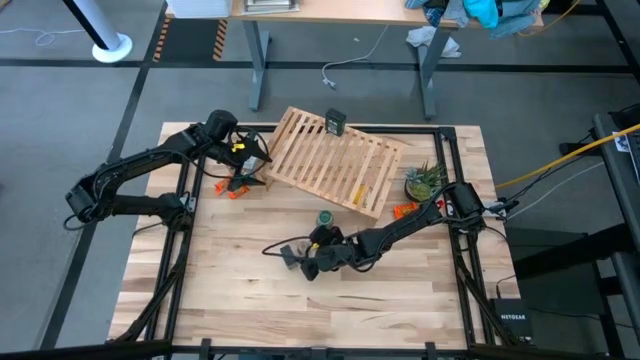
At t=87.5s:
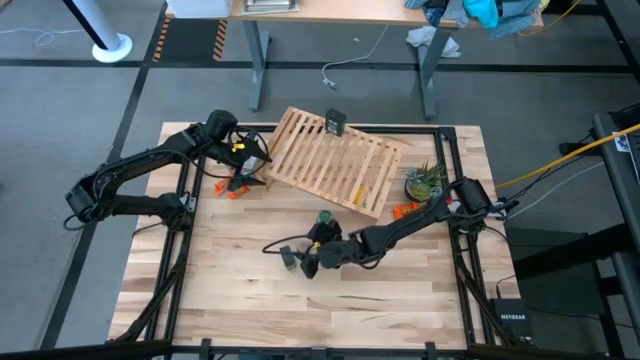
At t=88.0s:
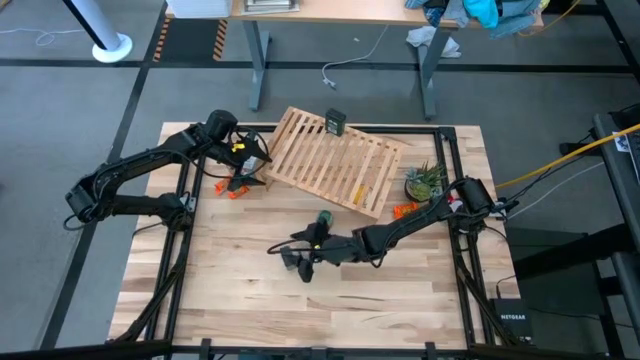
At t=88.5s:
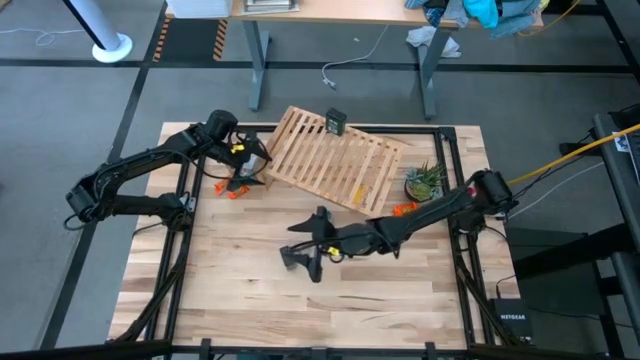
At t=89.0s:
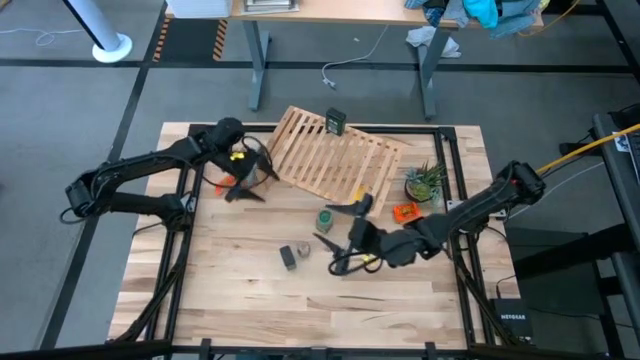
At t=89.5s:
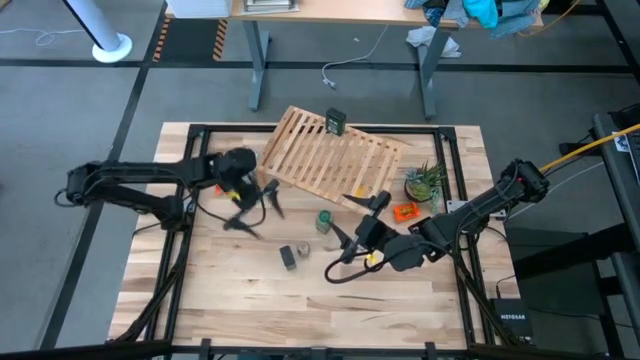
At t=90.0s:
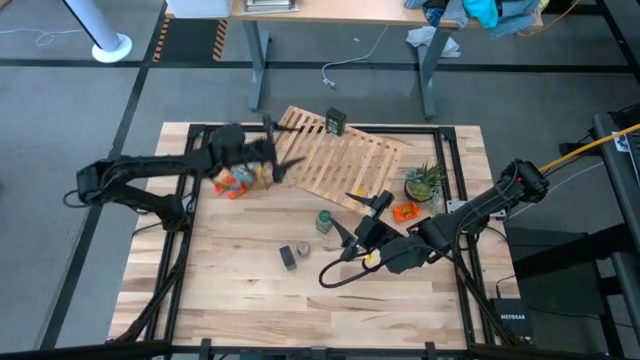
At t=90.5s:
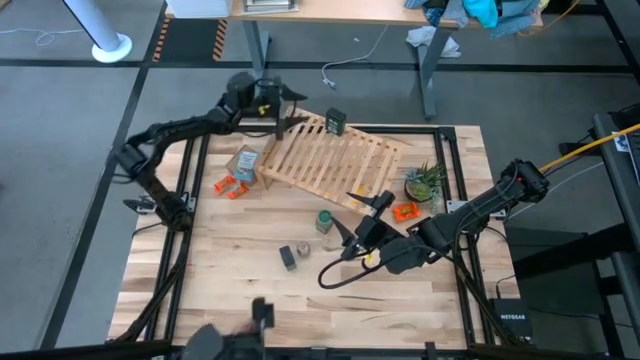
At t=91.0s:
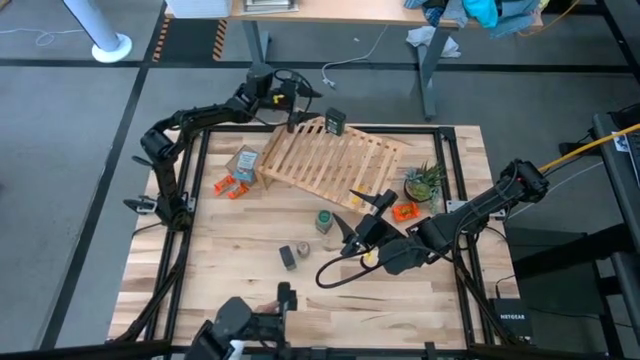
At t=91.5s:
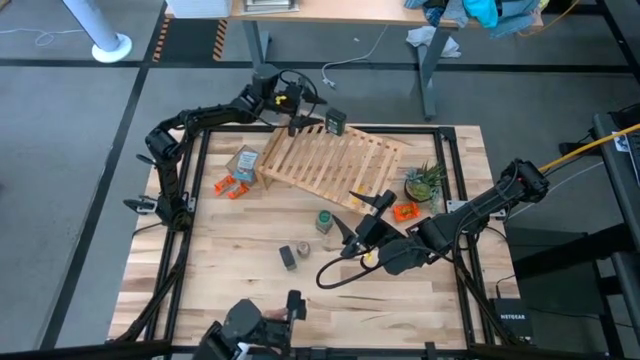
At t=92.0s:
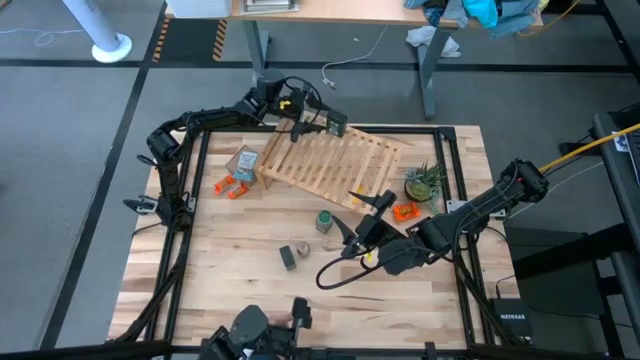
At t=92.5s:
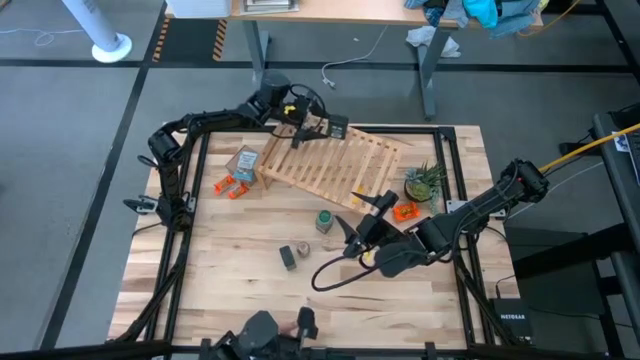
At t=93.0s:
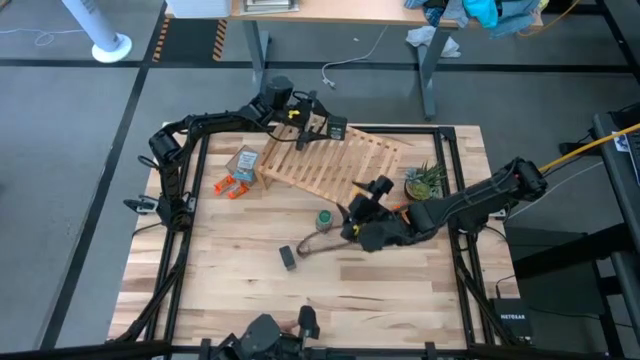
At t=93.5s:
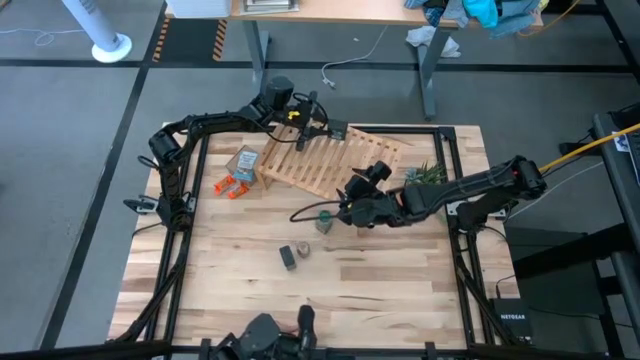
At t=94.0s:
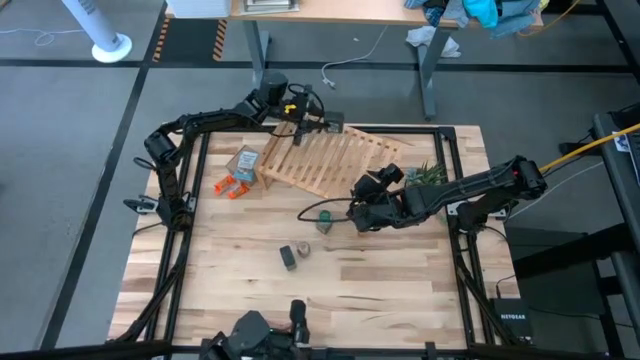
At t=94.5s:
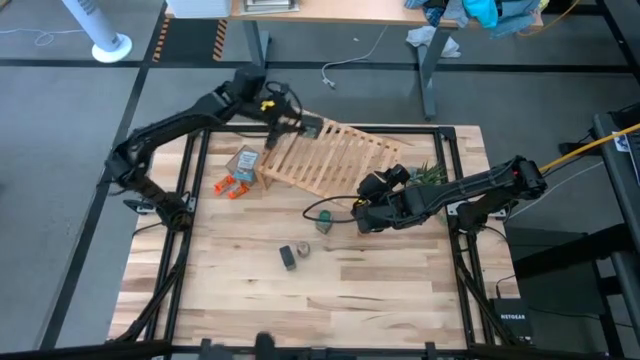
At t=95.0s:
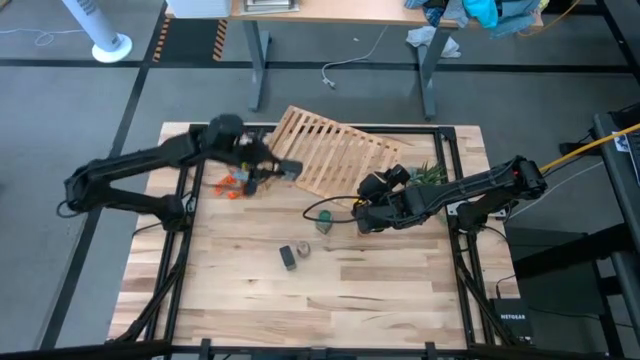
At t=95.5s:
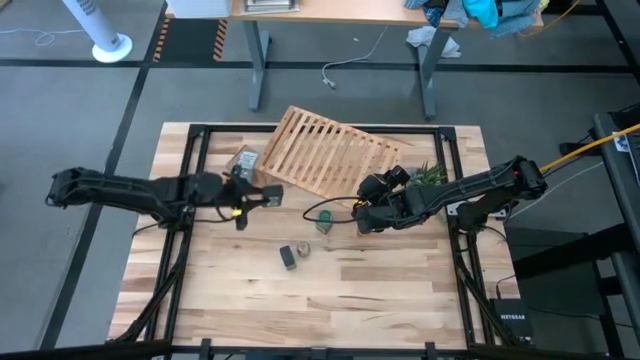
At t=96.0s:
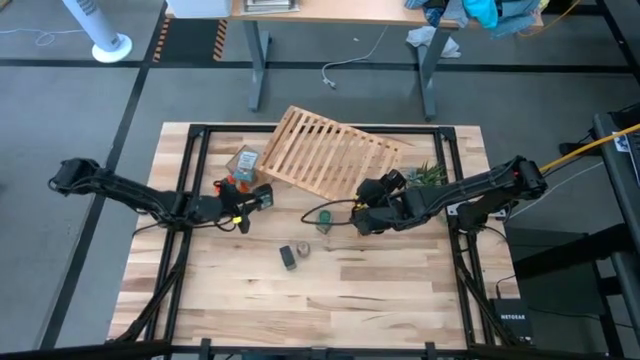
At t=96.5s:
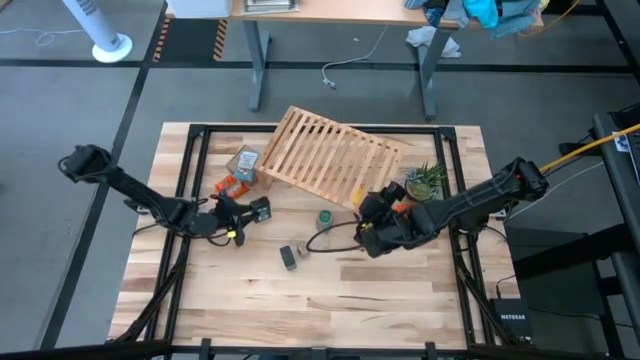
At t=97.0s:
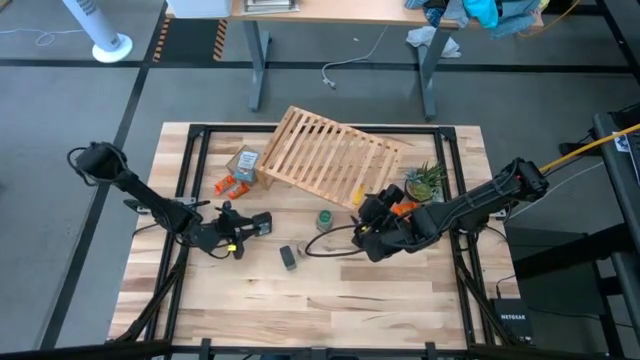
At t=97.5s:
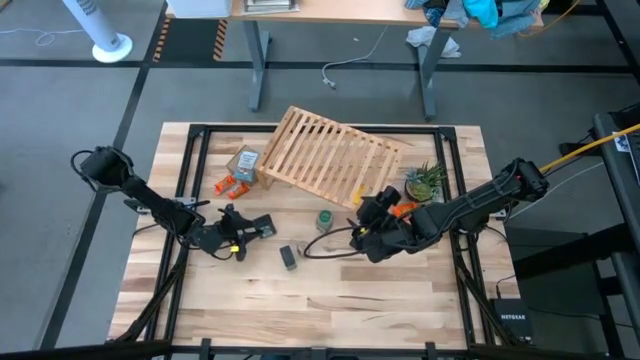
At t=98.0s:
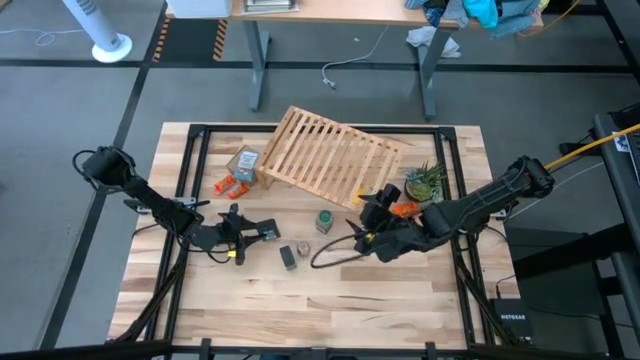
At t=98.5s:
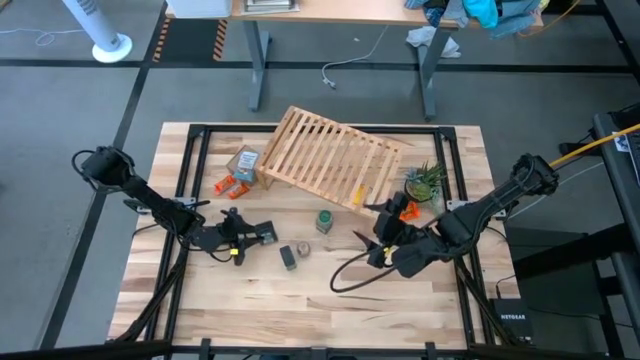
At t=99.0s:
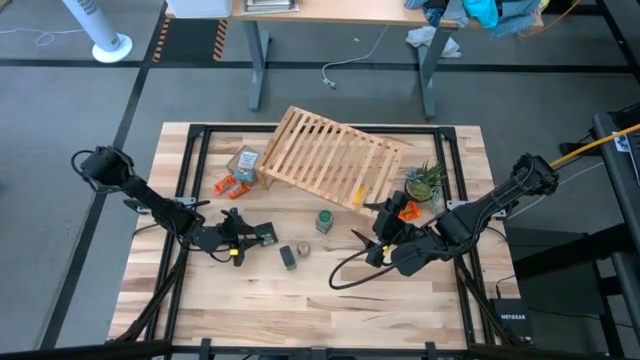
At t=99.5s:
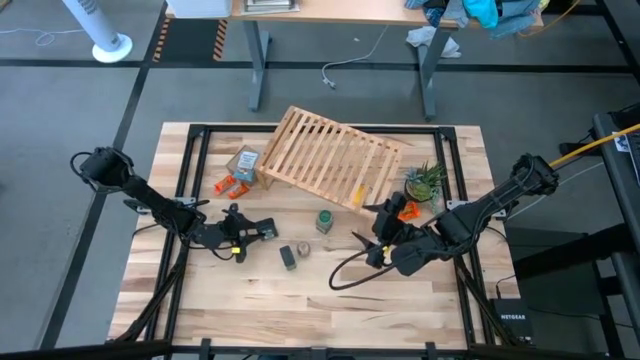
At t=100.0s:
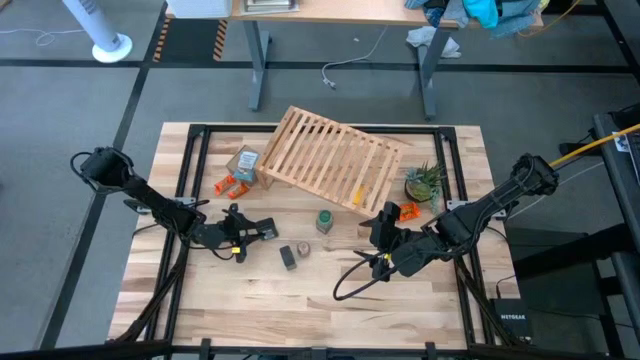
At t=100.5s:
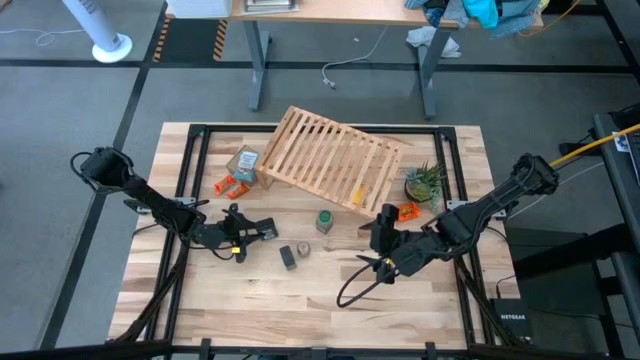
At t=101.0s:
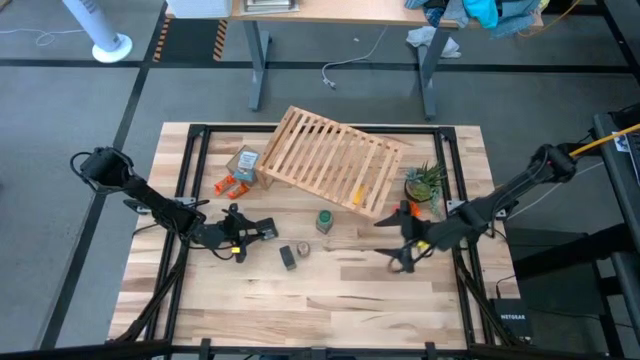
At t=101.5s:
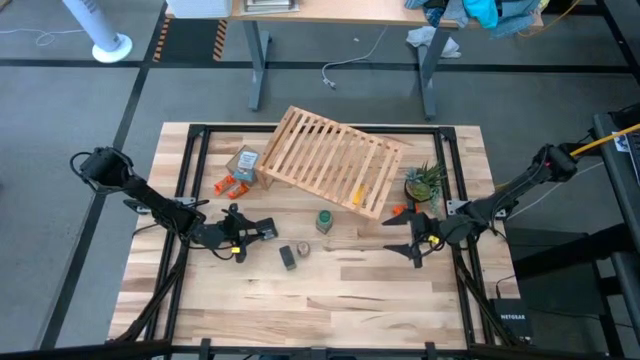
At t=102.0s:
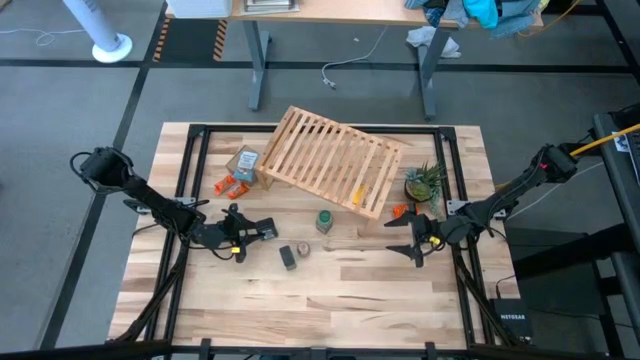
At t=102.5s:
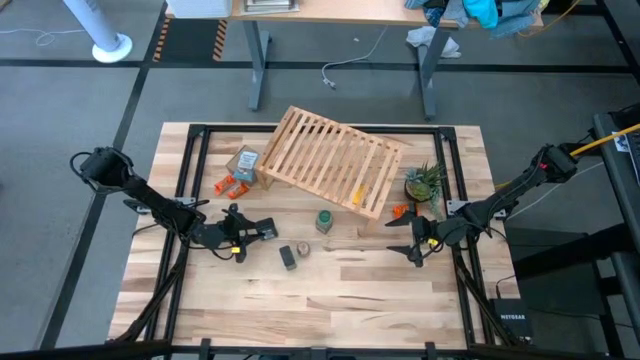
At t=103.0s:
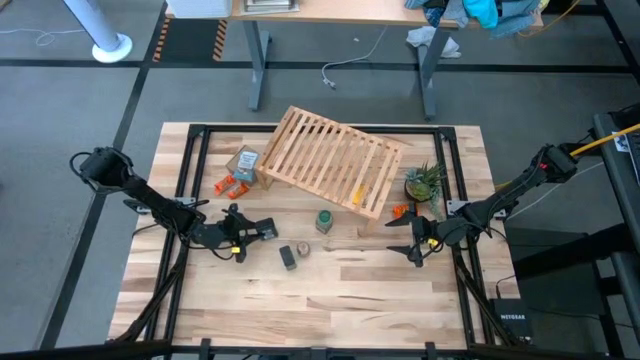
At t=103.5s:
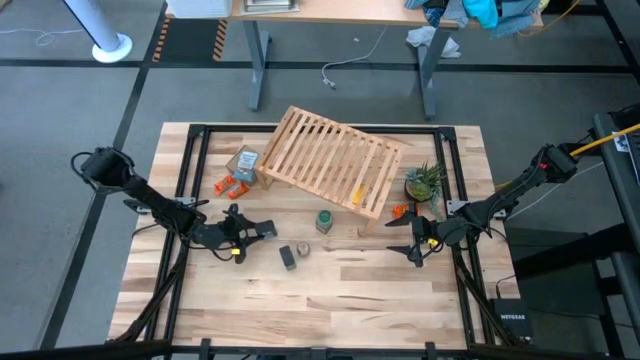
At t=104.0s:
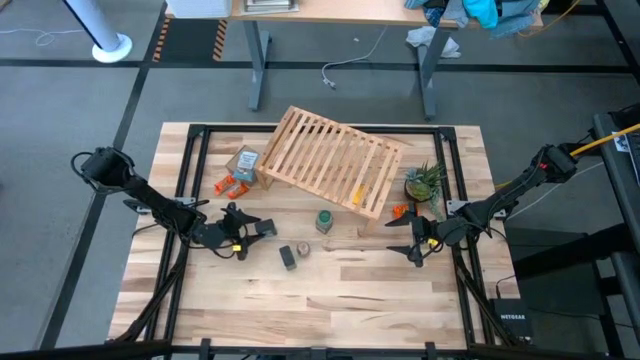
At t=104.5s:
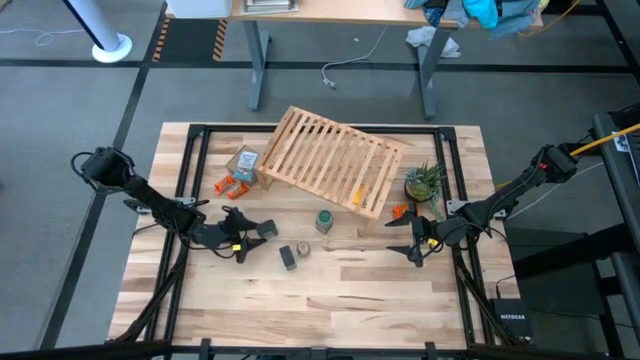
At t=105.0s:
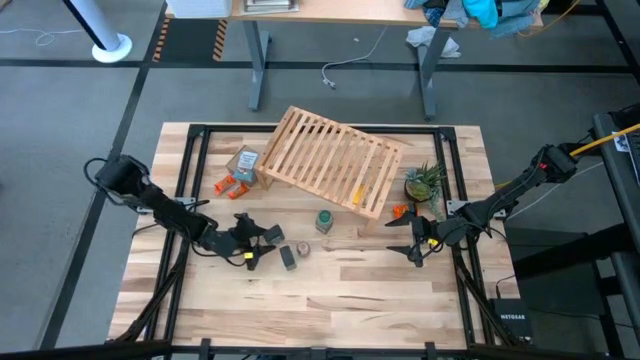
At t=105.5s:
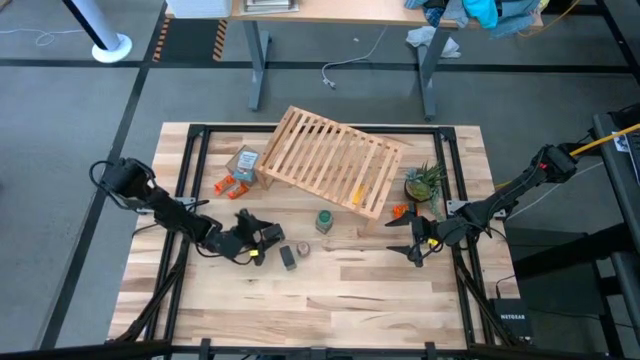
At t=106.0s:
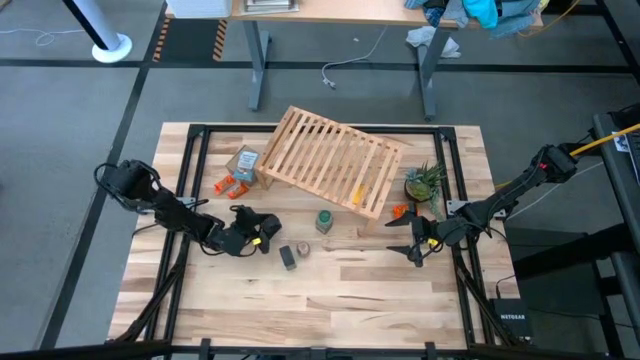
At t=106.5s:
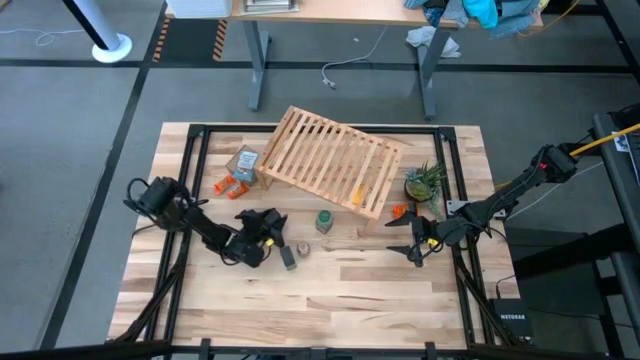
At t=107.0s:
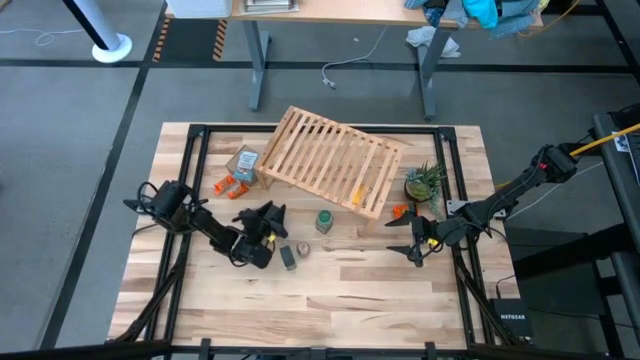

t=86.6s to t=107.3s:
Task: Shelf spices
Remove the green seasoning can from the shelf

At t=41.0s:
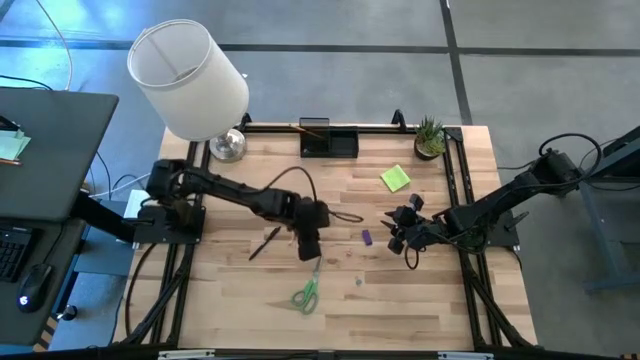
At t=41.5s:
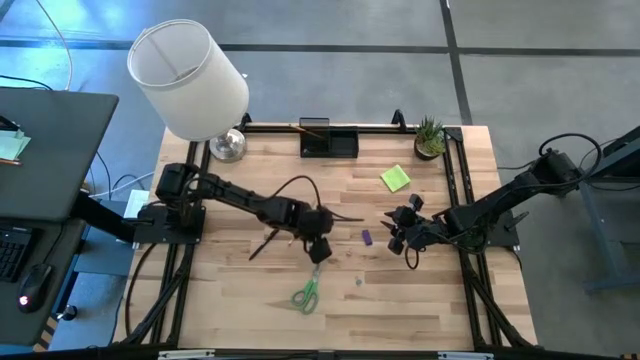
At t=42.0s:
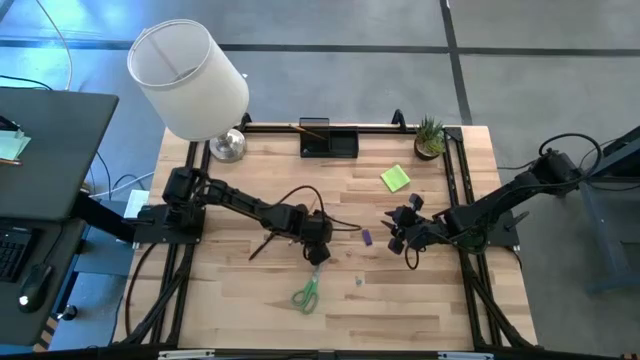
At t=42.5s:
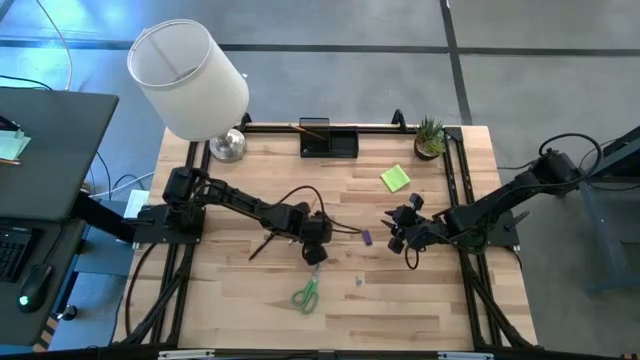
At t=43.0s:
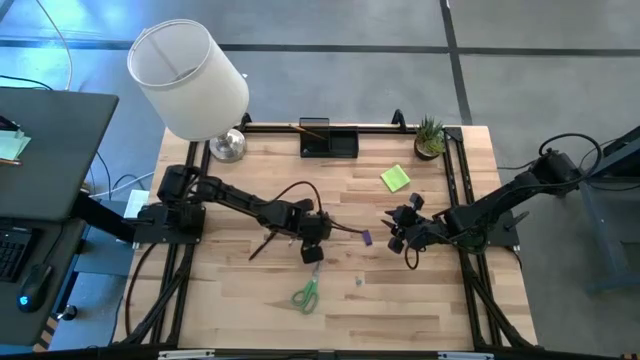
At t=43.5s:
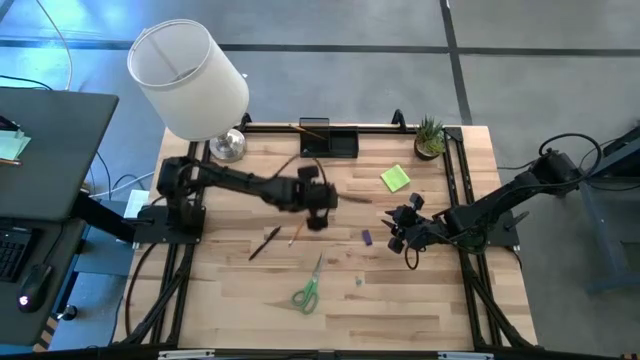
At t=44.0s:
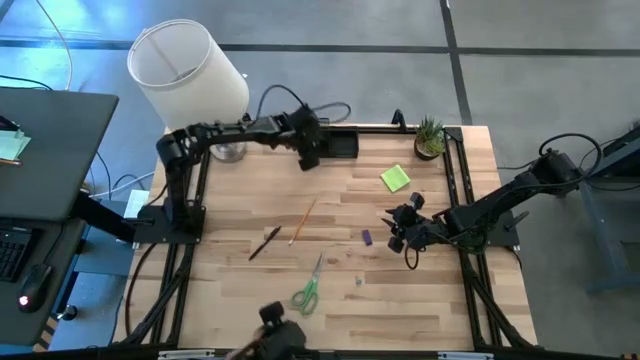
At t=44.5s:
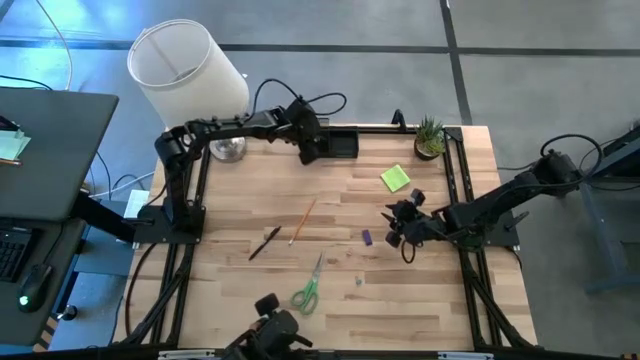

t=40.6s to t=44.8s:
Task: Pick and place office supplies into organizer
Put the yellow binder clip into the black desk organizer
